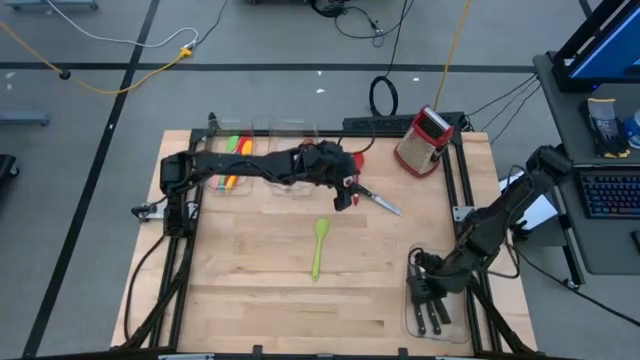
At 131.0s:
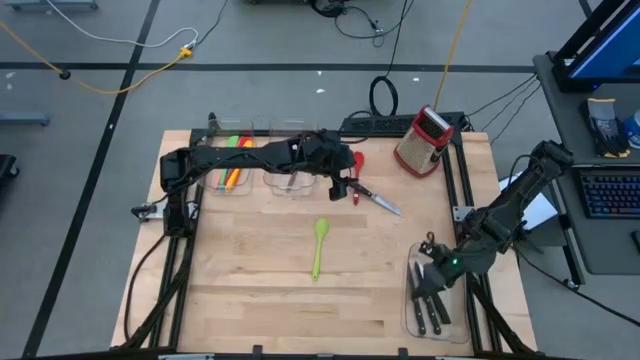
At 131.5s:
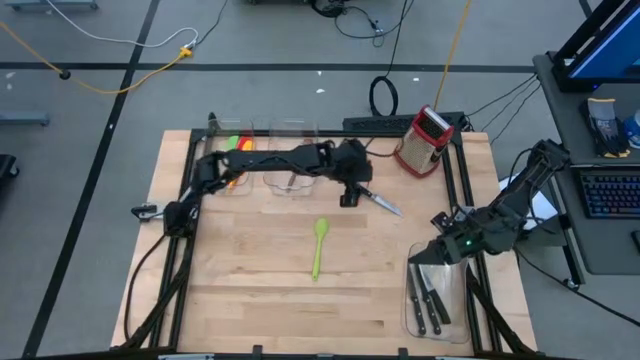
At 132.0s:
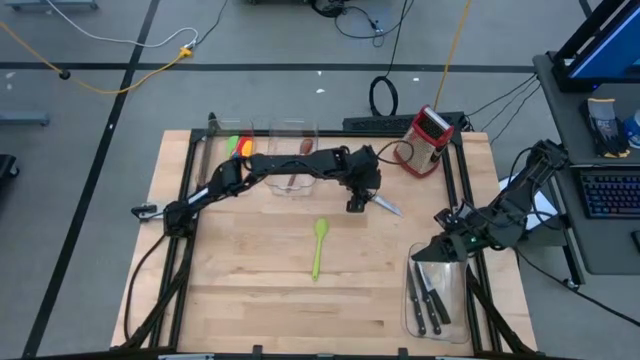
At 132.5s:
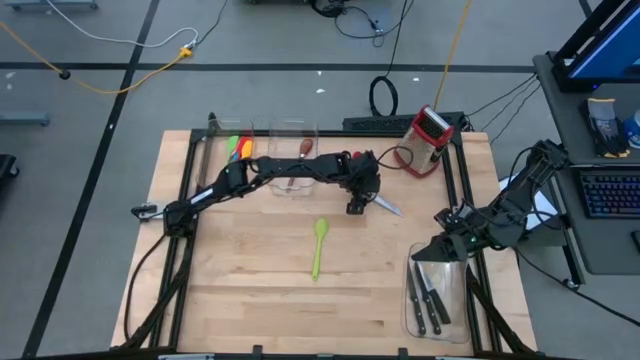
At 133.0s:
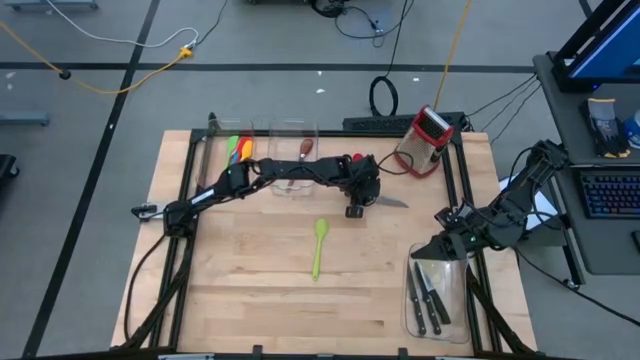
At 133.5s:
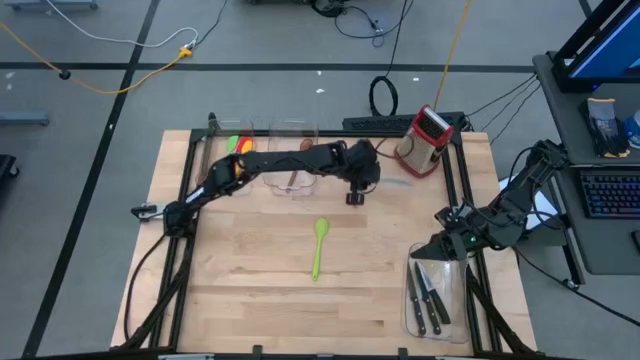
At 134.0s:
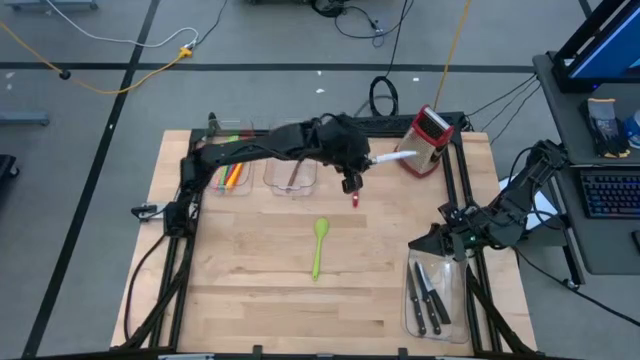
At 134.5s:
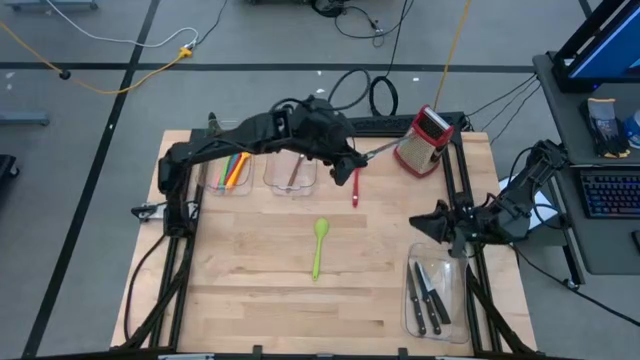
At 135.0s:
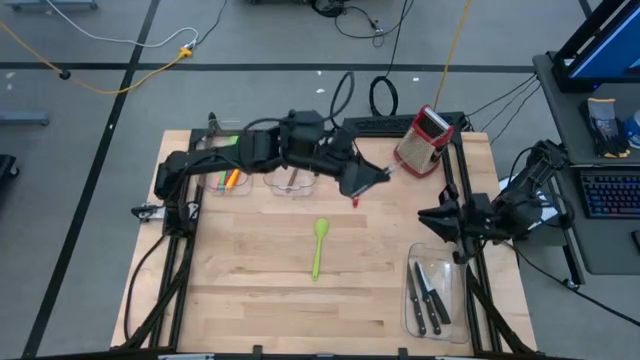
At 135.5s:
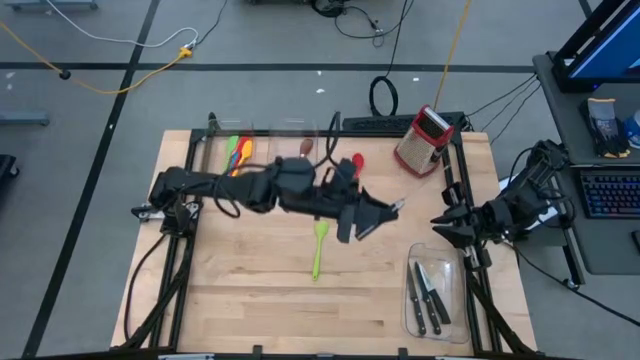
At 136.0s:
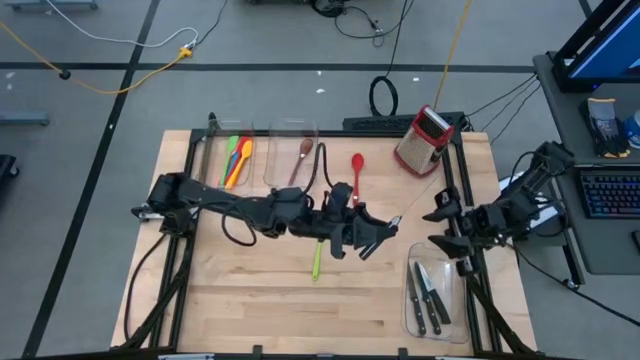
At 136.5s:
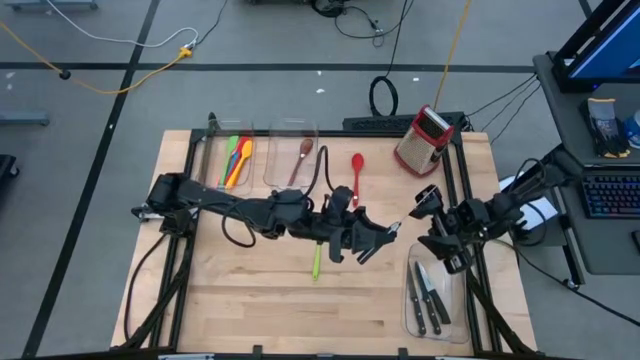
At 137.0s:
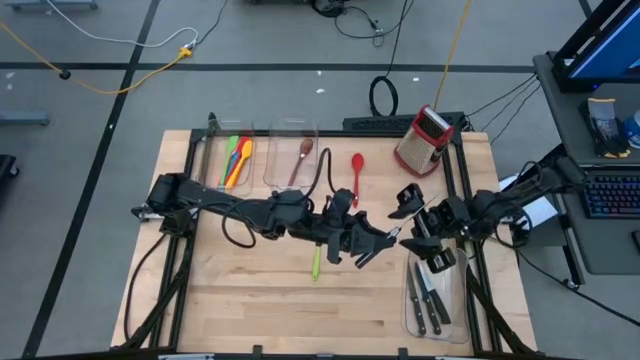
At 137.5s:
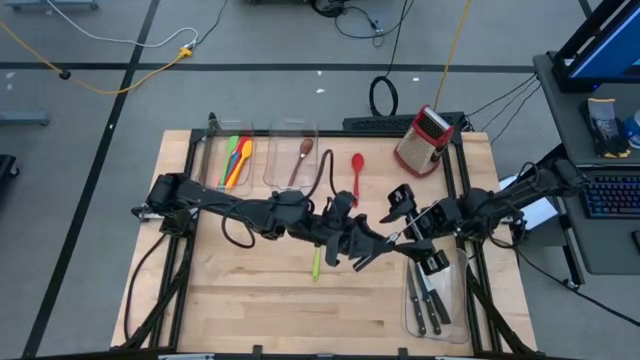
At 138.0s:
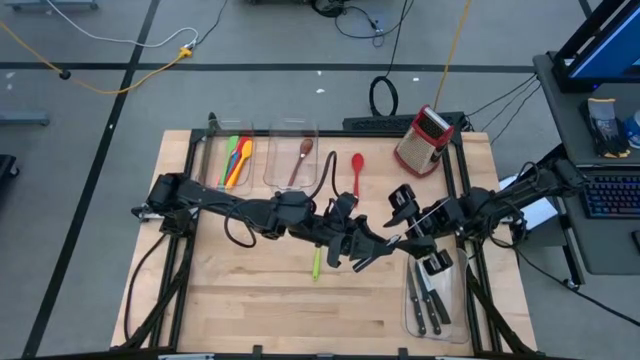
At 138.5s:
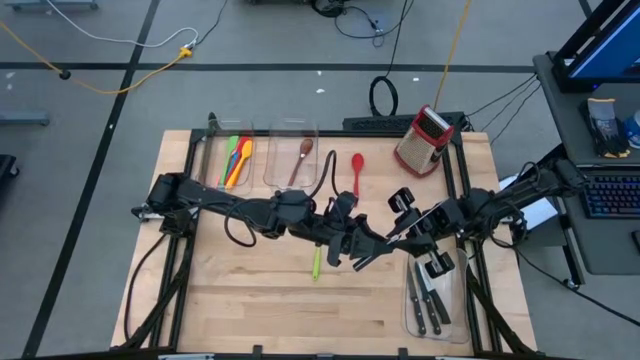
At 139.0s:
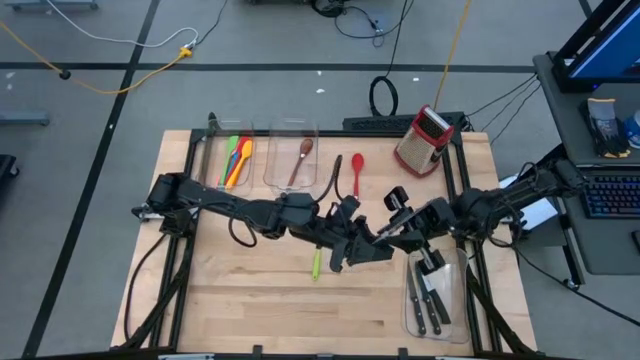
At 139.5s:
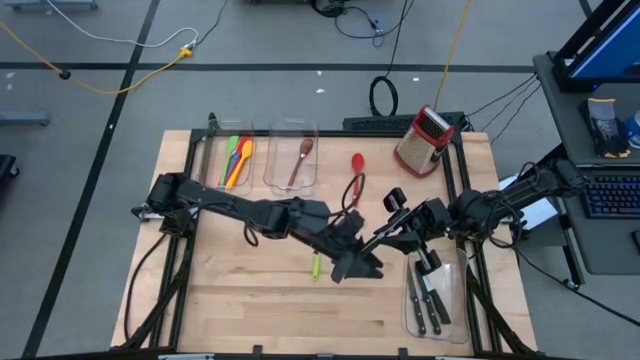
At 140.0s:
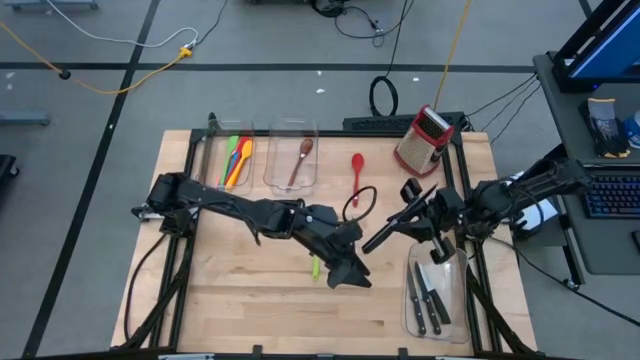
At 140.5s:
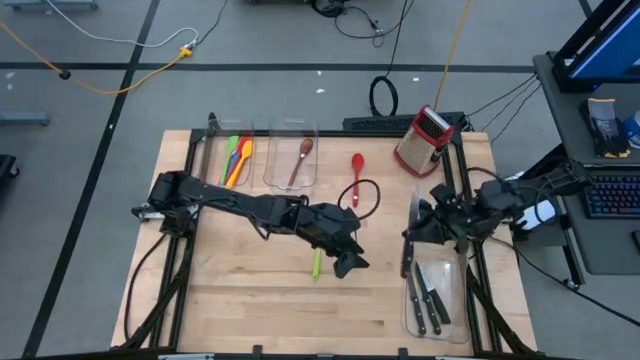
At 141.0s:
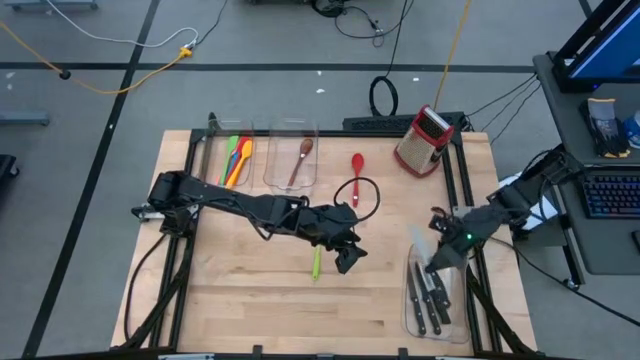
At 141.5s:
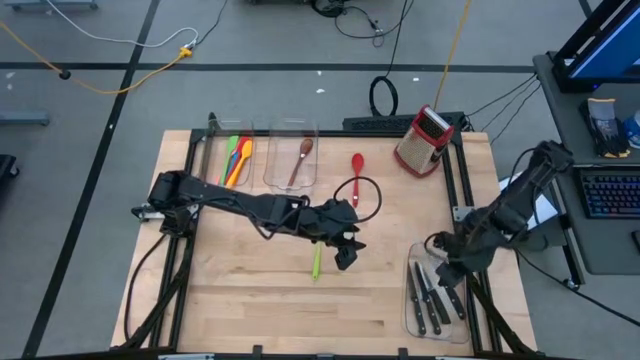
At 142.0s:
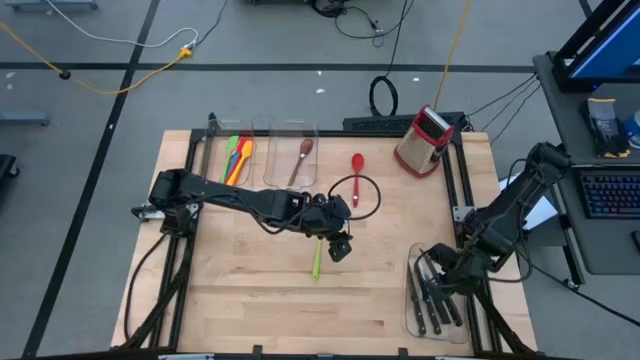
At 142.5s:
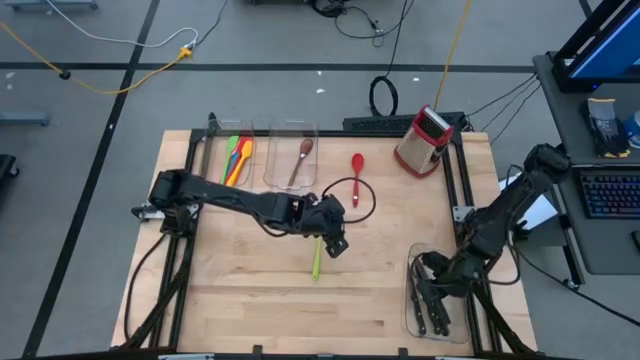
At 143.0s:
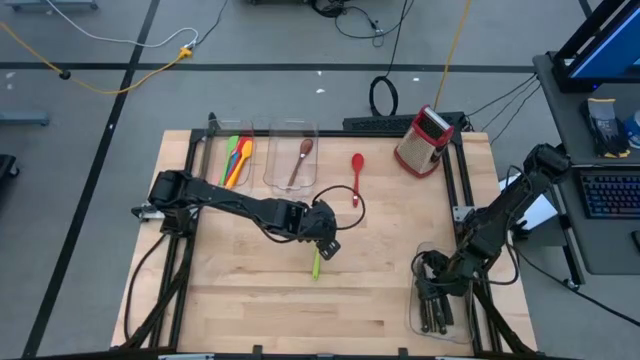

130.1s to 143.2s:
Task: Pick & Place Kitchen Items
Put the knife into the bottom transparent bin

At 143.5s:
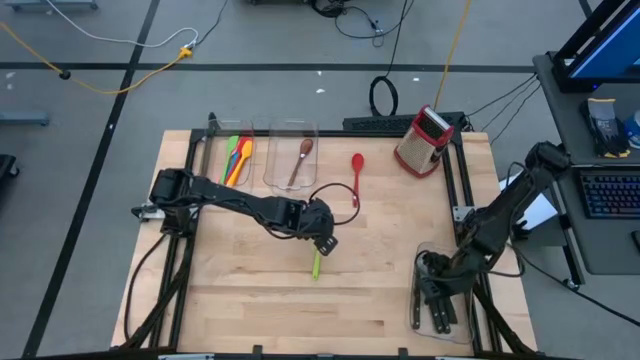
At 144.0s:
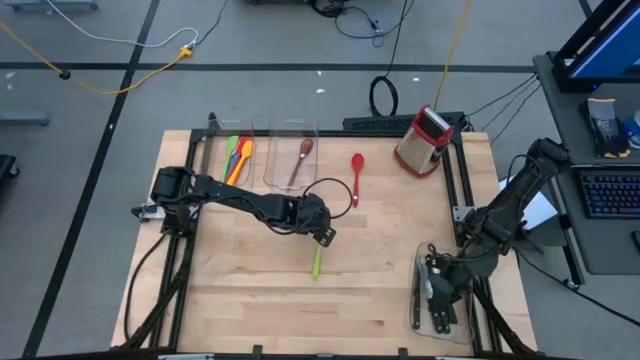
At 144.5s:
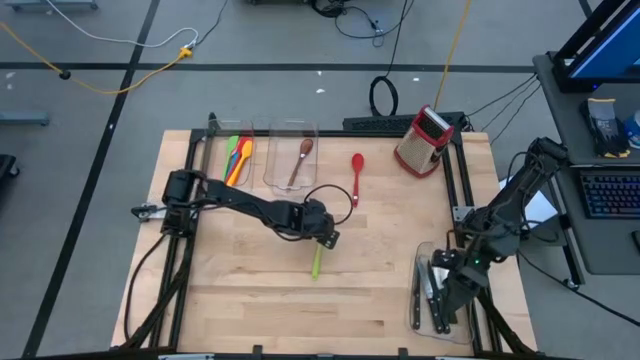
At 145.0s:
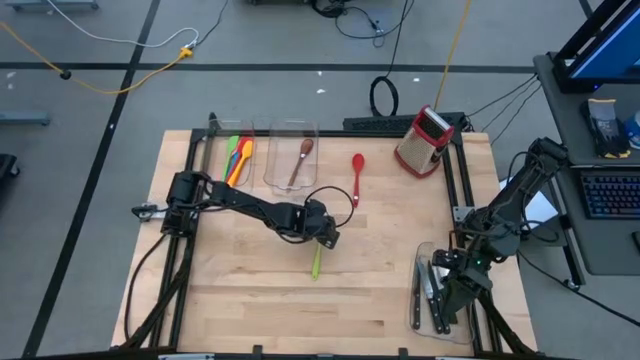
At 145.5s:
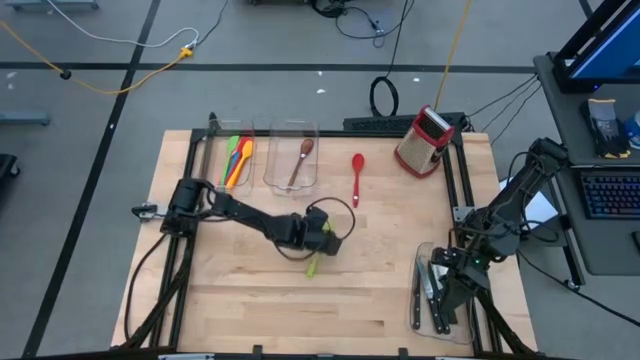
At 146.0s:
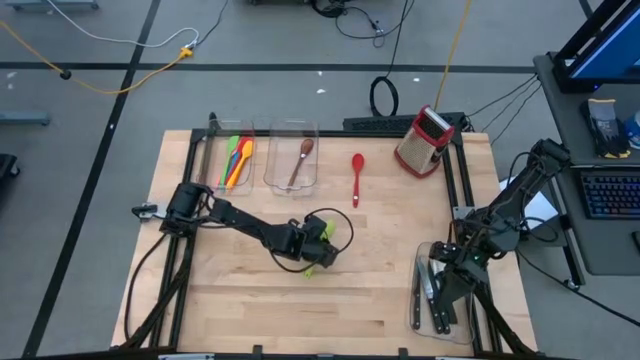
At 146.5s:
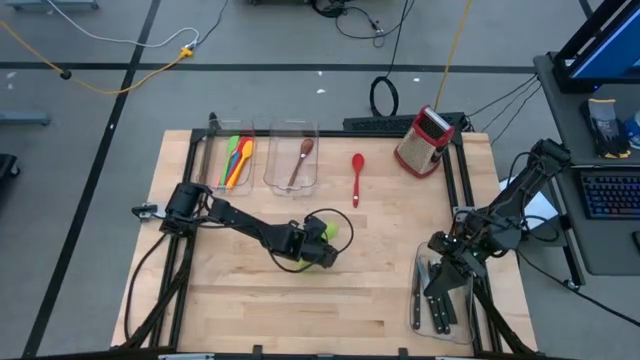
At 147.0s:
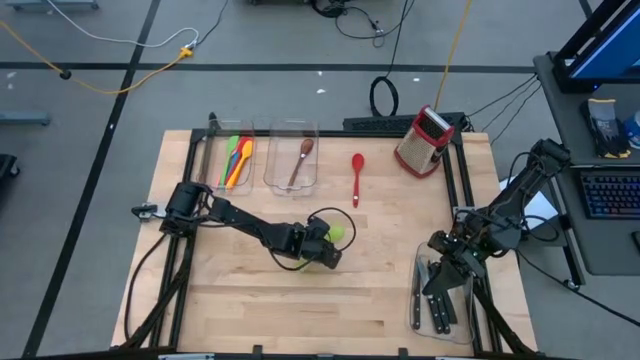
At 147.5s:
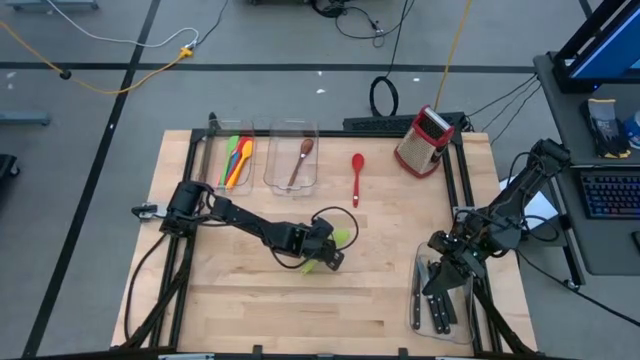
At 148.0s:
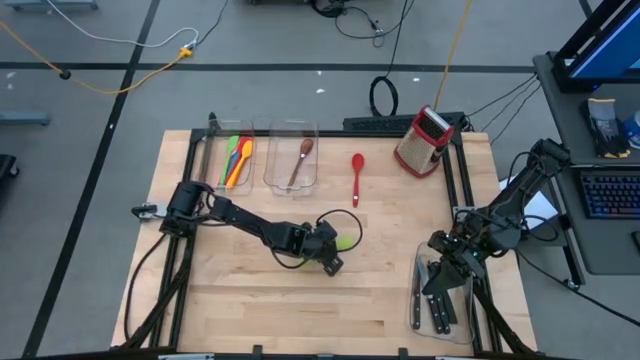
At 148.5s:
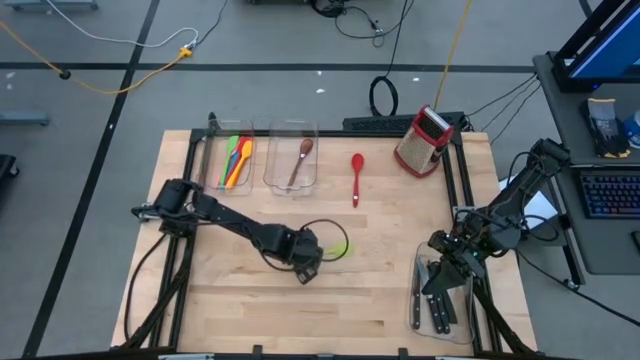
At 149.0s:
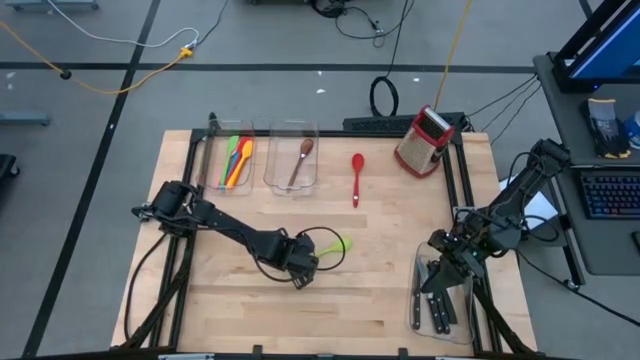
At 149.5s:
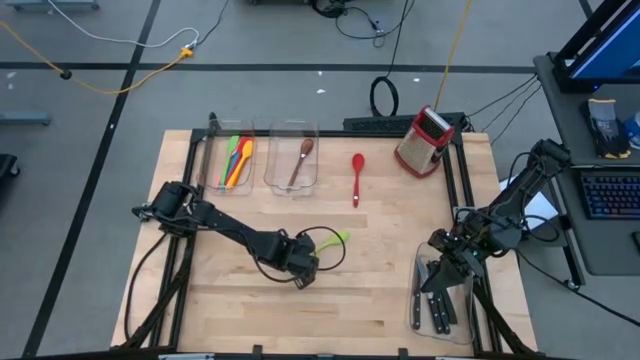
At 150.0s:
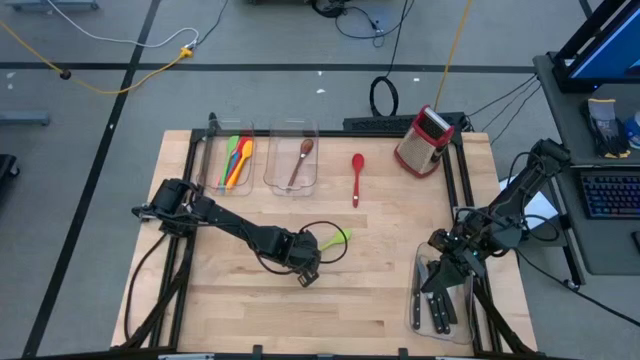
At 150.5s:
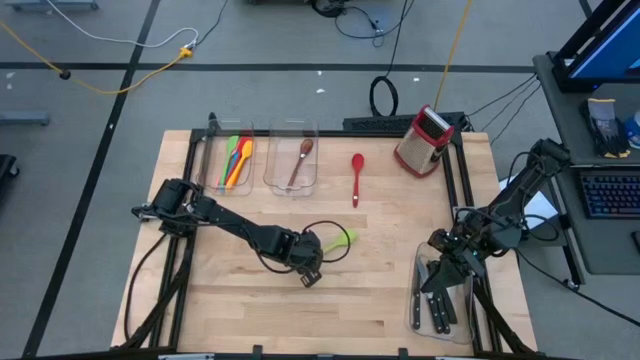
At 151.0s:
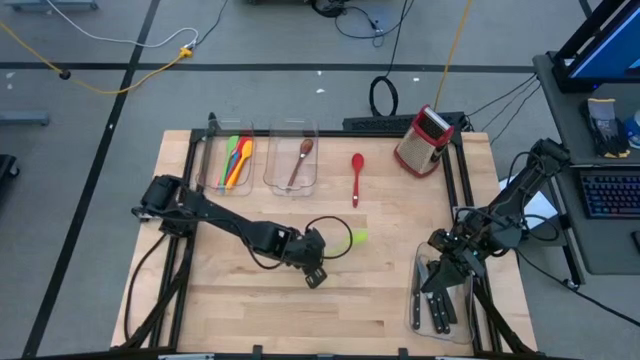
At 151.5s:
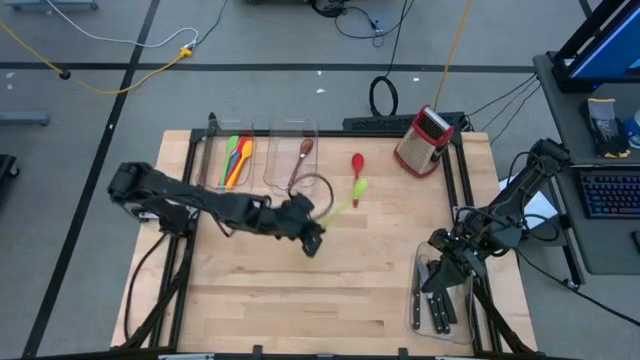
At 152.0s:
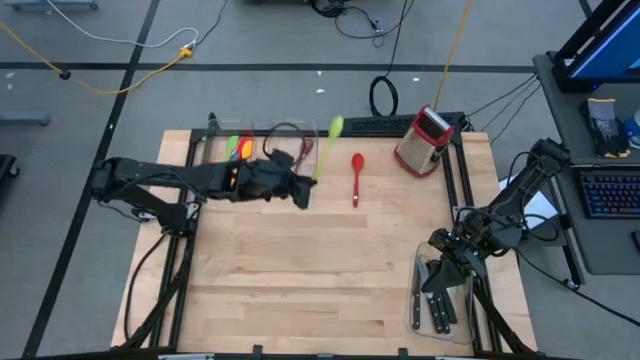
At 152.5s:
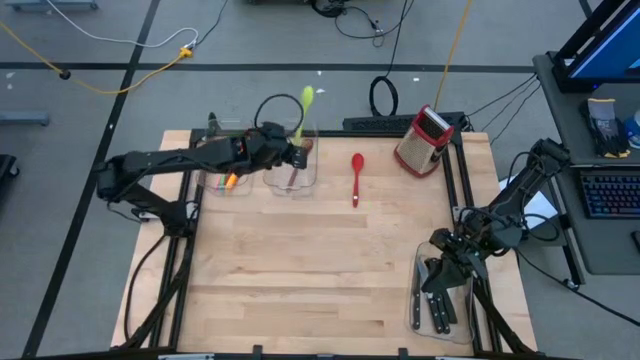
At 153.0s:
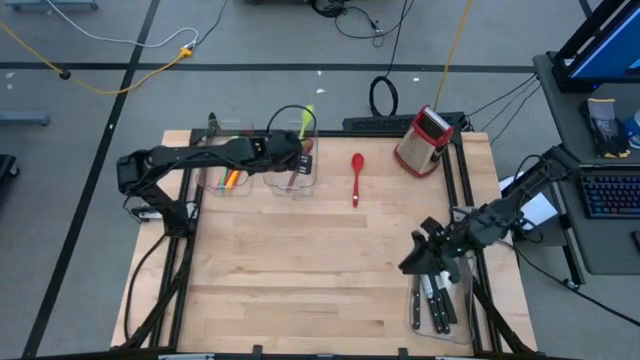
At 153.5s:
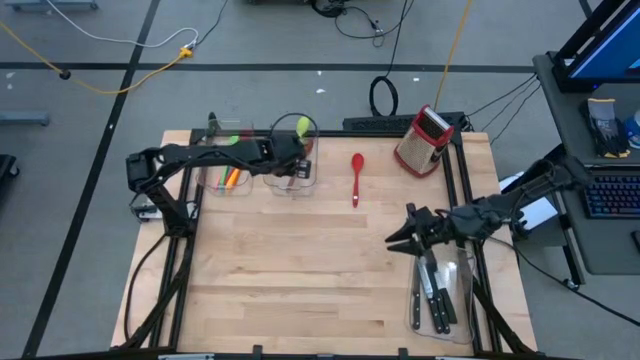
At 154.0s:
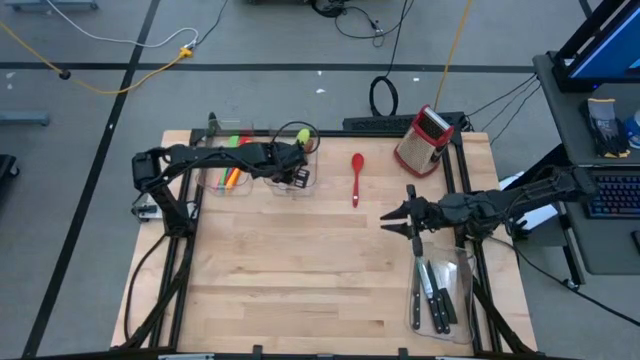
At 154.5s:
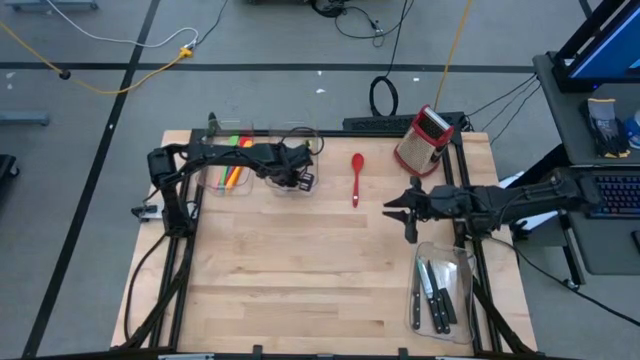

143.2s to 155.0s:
Put the green serving spoon into the right transparent bin
